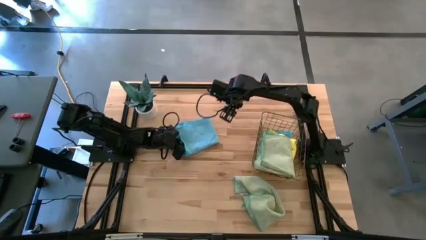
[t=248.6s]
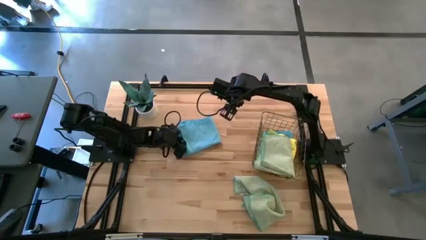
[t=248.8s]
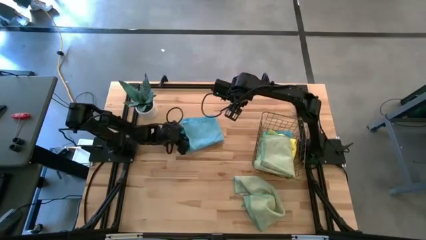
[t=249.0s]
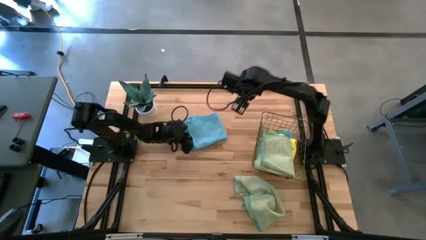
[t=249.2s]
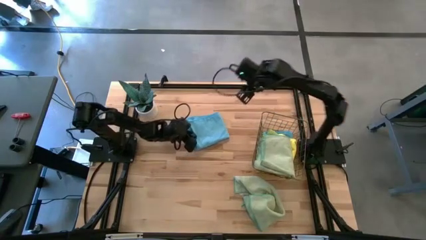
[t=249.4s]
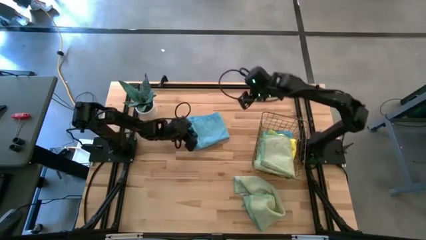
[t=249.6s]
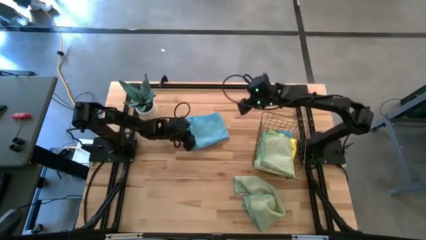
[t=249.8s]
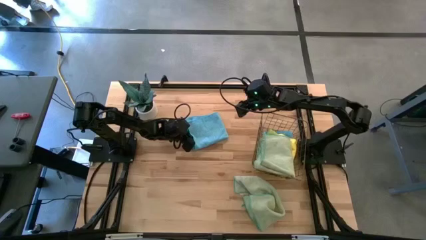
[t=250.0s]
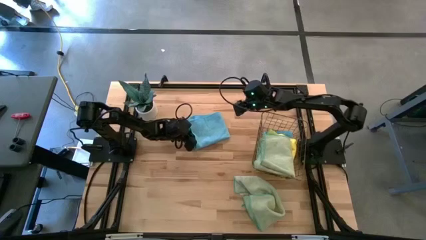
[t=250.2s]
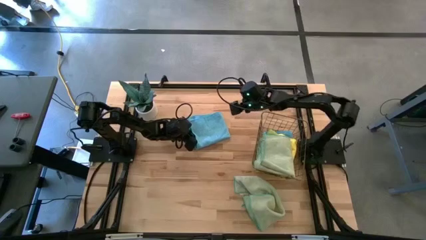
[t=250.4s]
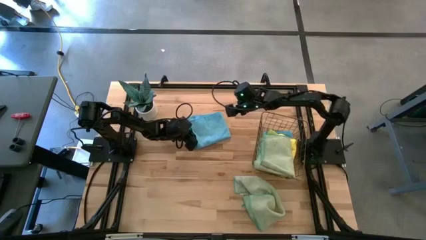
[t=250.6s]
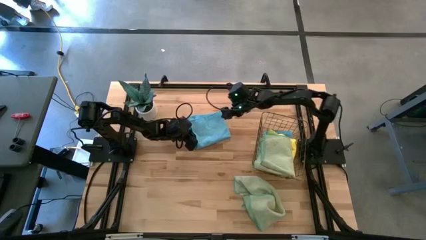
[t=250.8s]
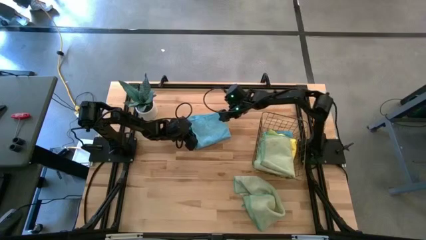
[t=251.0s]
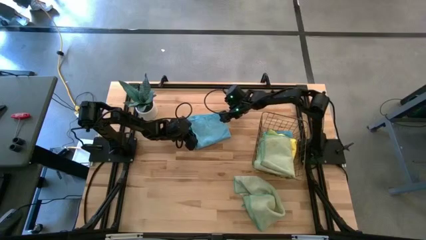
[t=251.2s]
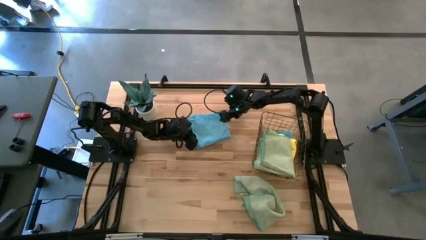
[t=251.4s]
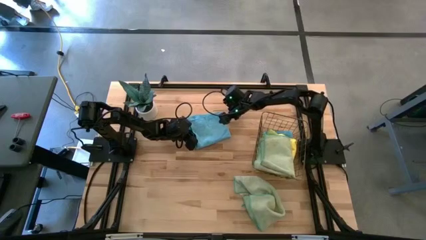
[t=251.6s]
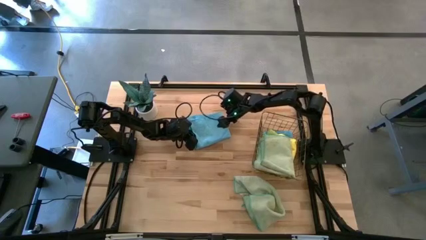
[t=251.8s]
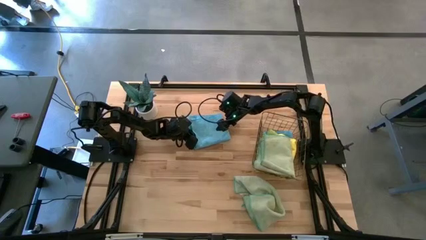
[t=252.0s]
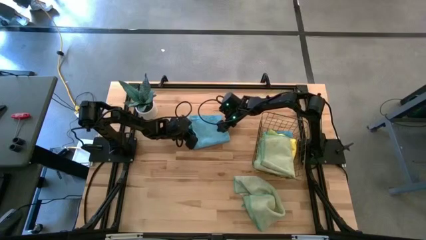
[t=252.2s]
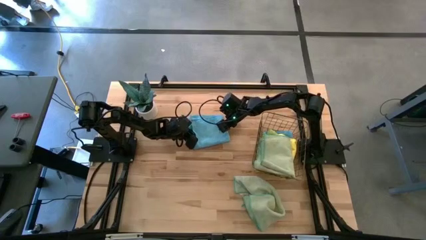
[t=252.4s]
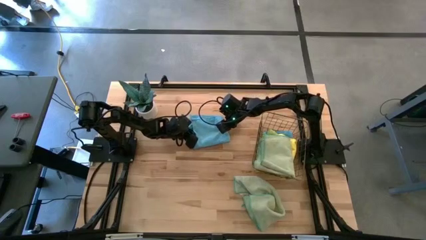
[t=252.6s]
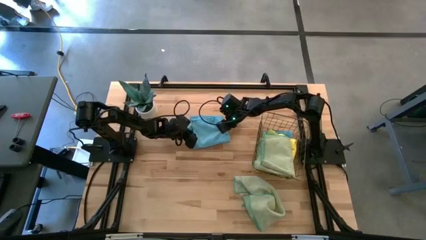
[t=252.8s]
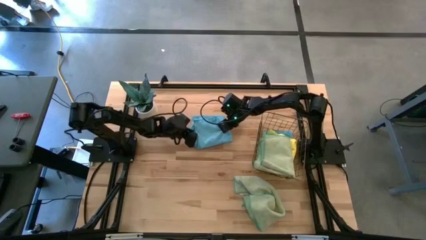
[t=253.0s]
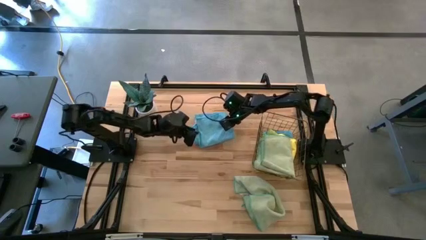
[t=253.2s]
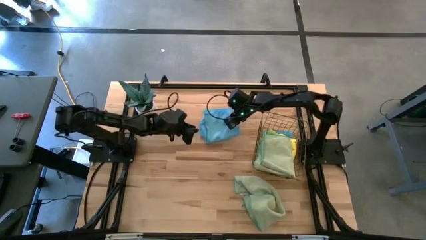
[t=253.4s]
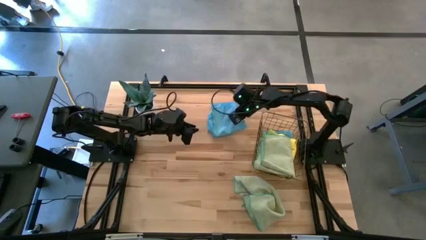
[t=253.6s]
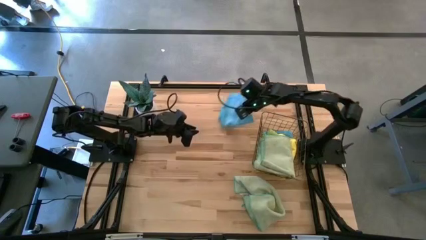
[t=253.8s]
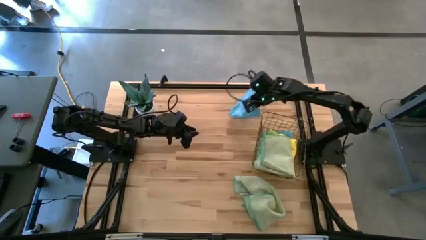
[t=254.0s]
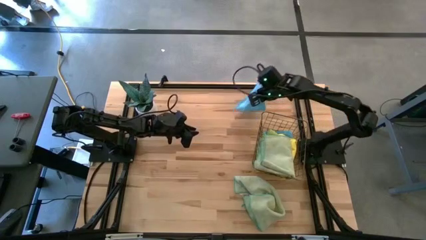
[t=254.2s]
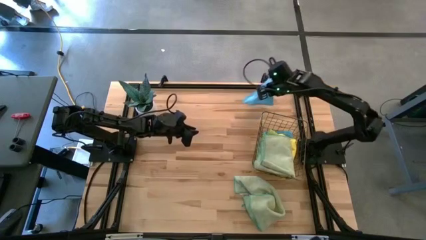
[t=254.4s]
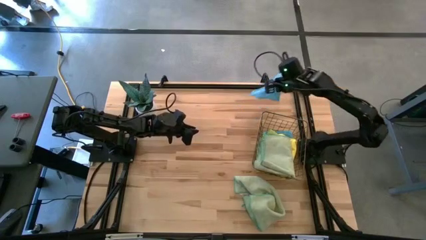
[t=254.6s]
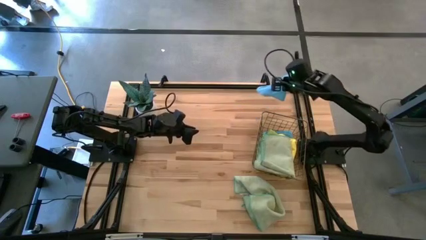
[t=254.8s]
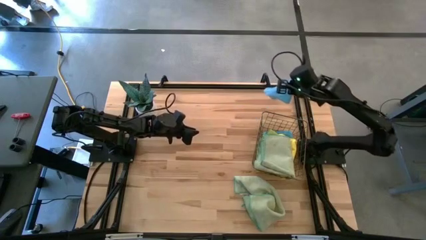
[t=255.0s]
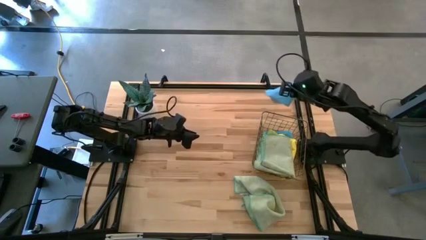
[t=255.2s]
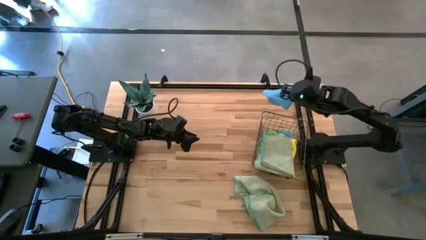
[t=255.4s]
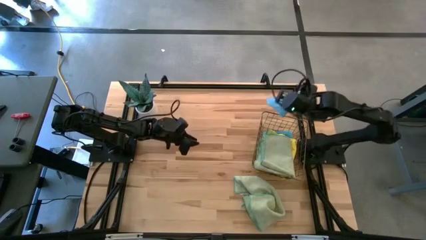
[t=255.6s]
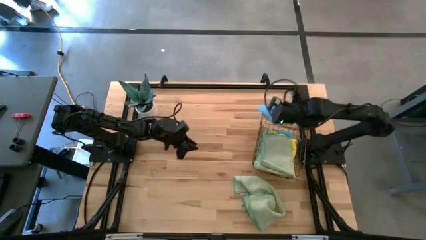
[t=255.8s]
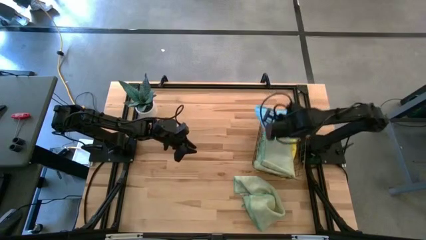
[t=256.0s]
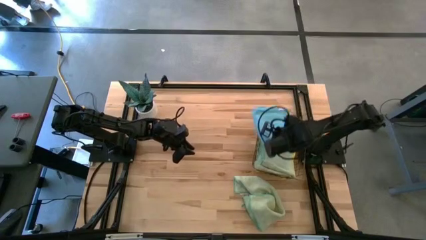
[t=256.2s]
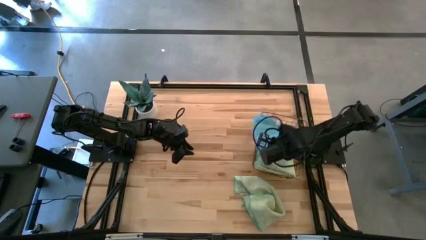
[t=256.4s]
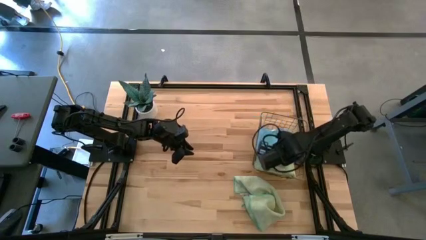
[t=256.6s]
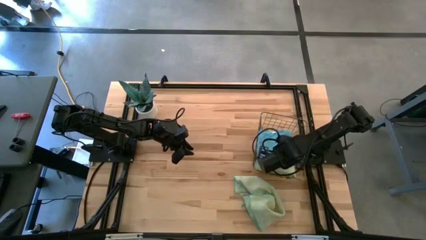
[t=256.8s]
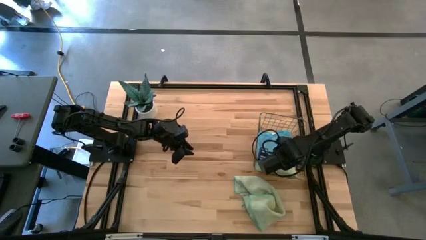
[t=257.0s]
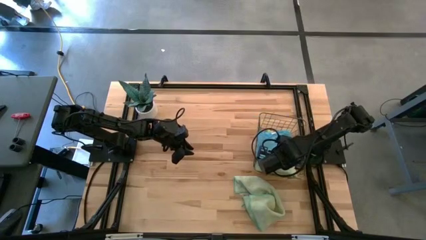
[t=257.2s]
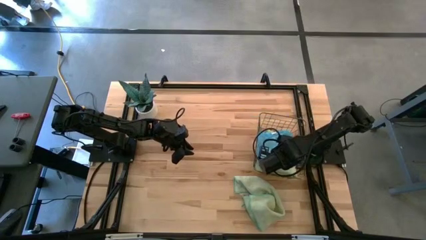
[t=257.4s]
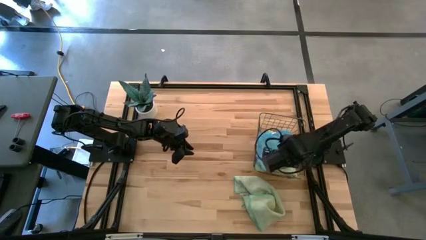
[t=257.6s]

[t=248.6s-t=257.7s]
Task: Fold microfiber towels
Stack the folded blue microfiber cloth into the wire basket

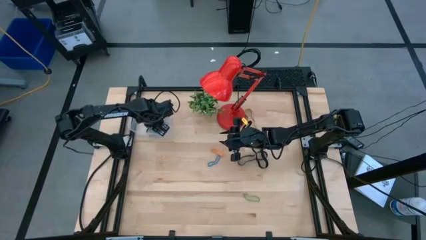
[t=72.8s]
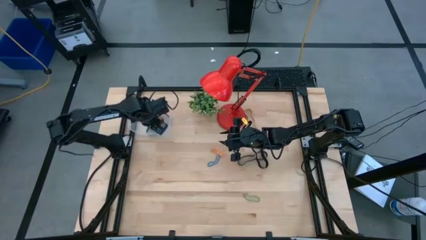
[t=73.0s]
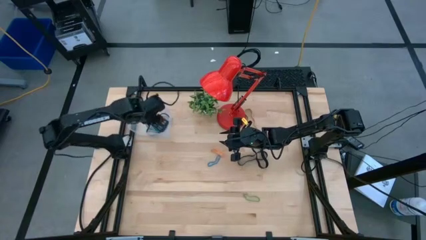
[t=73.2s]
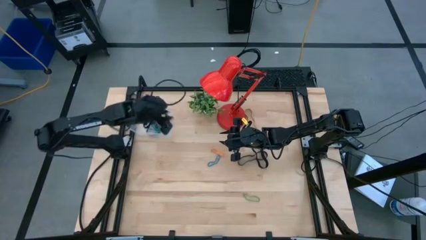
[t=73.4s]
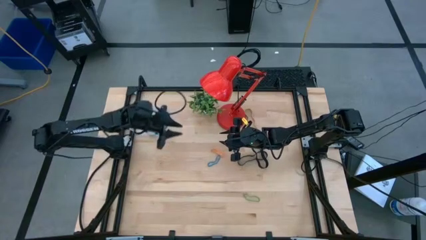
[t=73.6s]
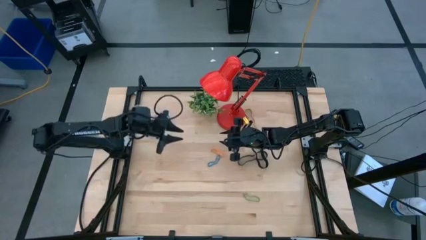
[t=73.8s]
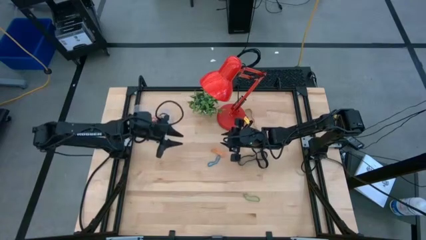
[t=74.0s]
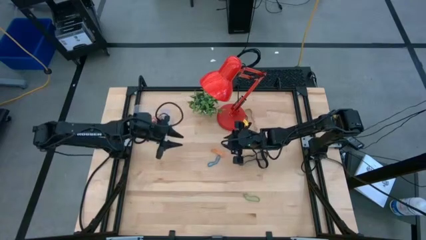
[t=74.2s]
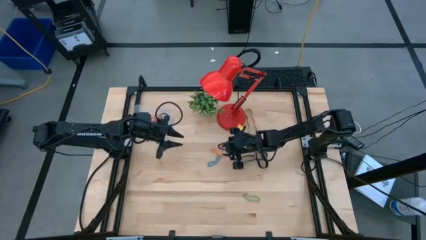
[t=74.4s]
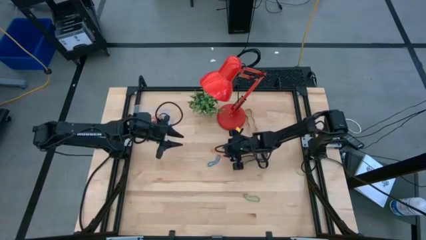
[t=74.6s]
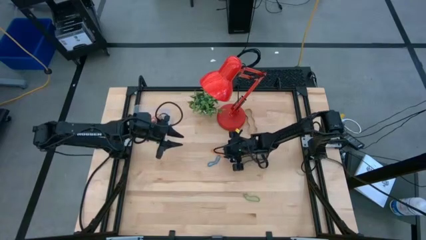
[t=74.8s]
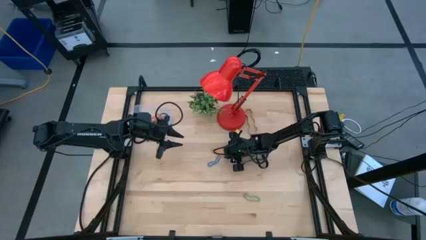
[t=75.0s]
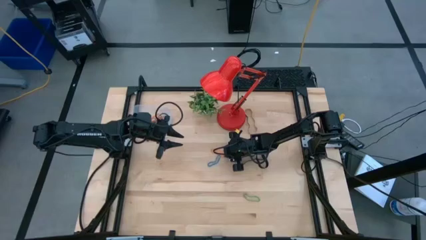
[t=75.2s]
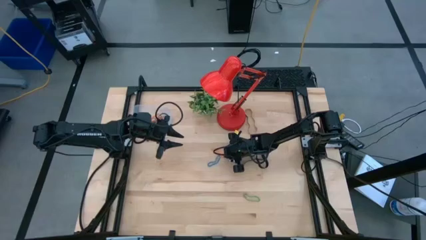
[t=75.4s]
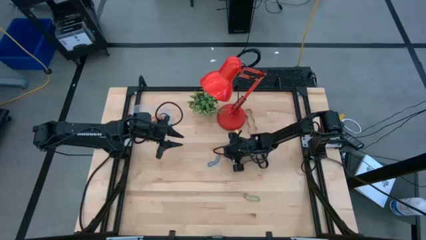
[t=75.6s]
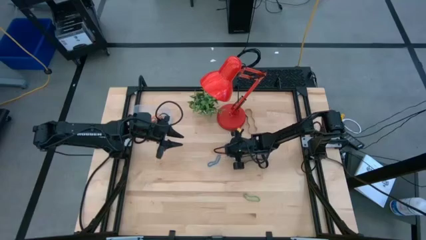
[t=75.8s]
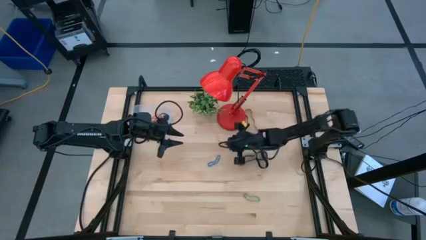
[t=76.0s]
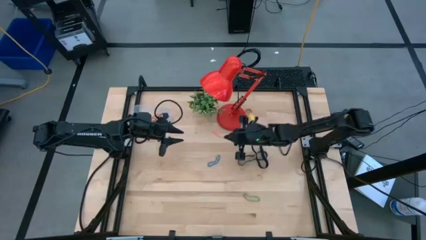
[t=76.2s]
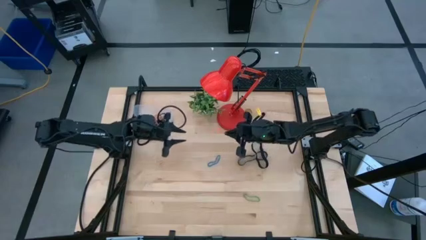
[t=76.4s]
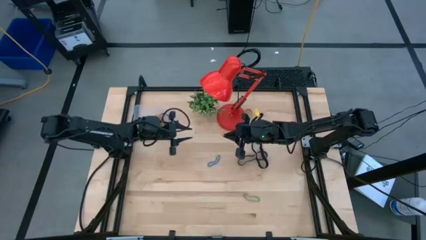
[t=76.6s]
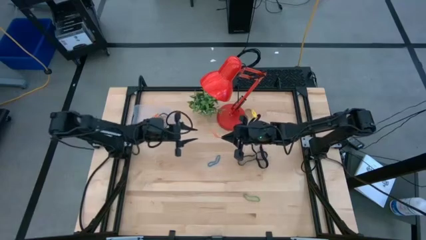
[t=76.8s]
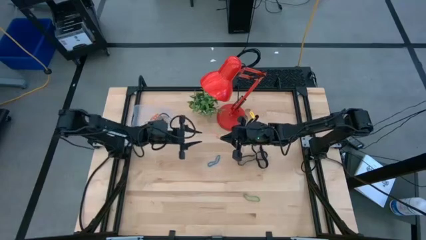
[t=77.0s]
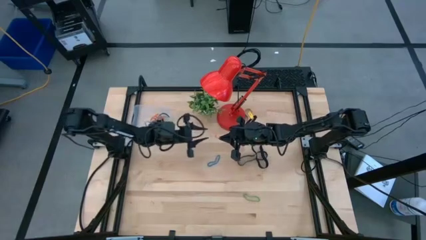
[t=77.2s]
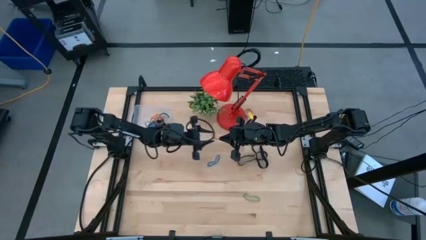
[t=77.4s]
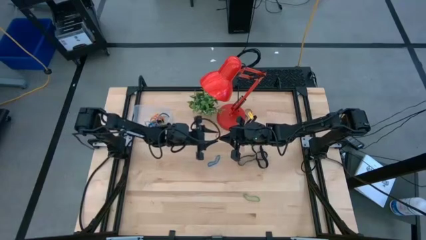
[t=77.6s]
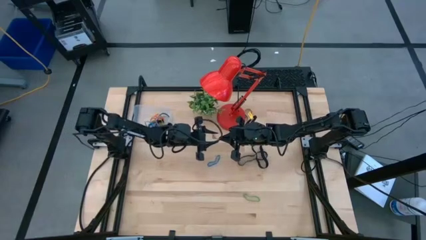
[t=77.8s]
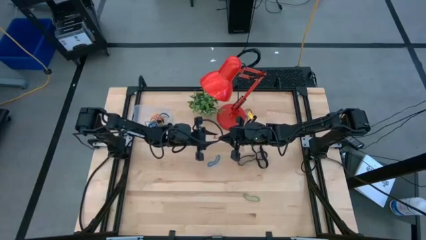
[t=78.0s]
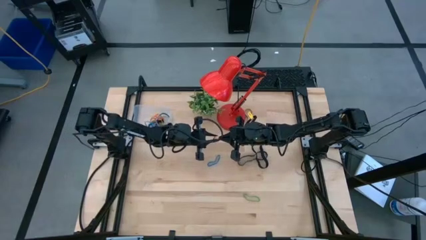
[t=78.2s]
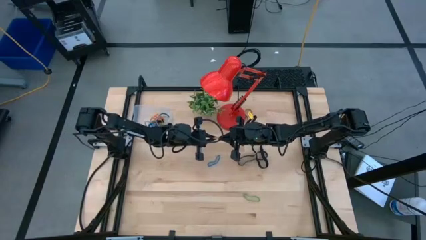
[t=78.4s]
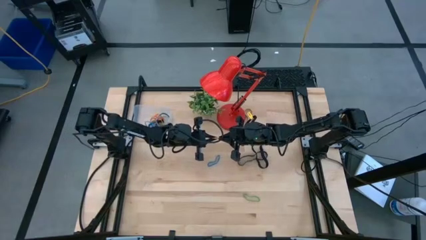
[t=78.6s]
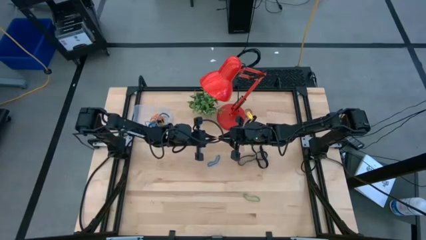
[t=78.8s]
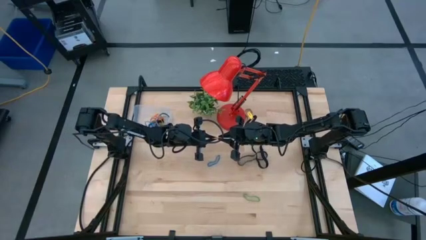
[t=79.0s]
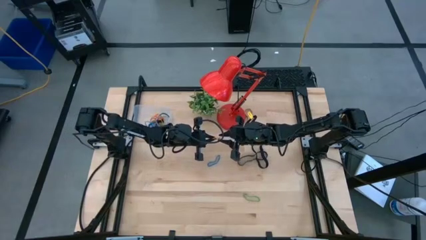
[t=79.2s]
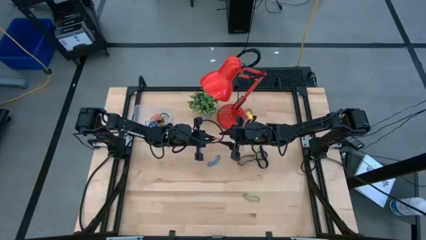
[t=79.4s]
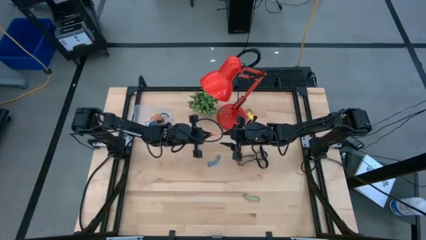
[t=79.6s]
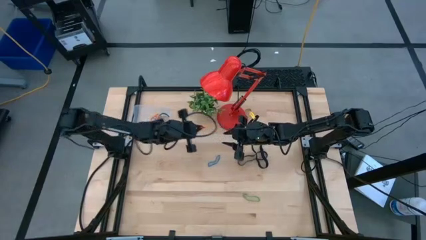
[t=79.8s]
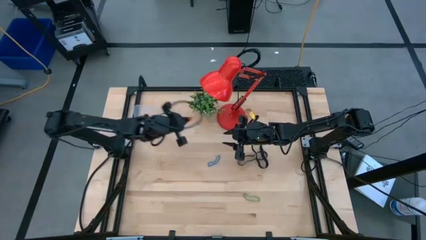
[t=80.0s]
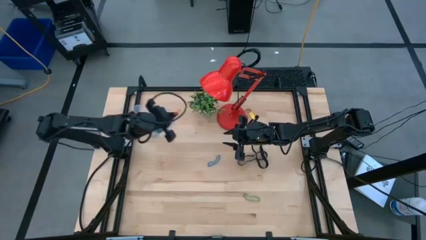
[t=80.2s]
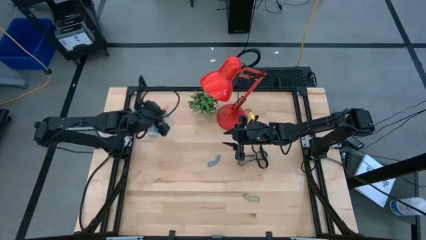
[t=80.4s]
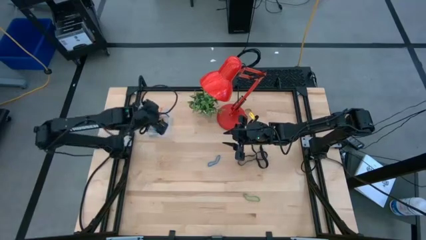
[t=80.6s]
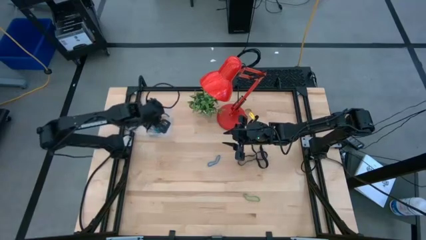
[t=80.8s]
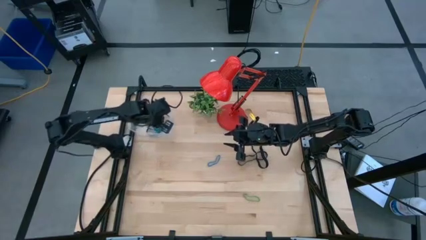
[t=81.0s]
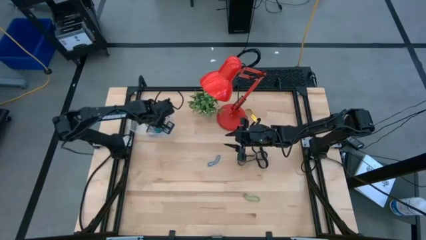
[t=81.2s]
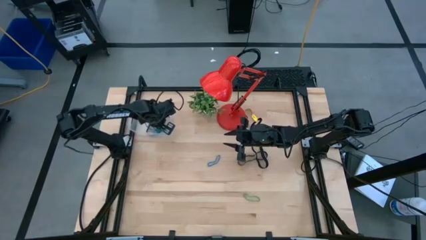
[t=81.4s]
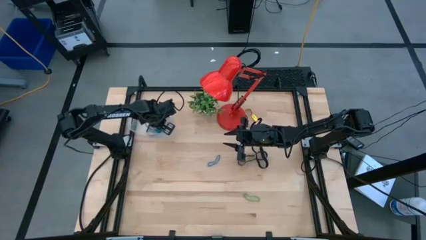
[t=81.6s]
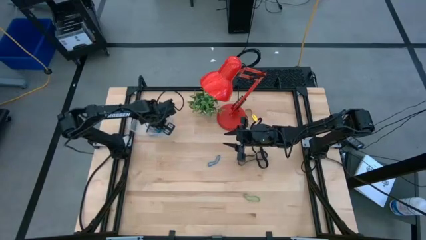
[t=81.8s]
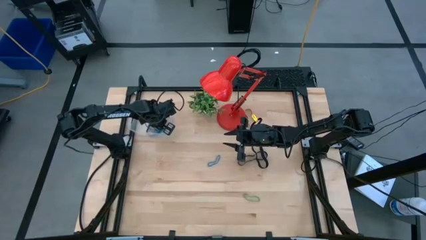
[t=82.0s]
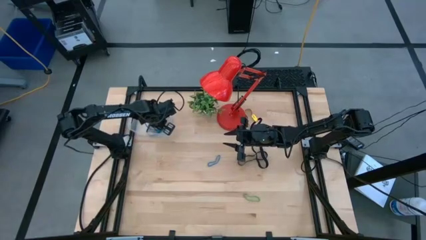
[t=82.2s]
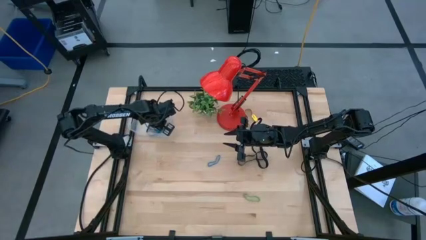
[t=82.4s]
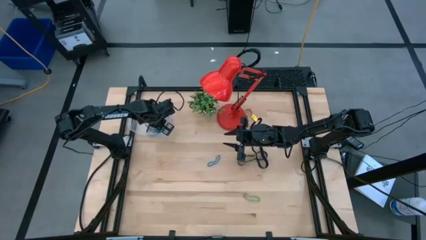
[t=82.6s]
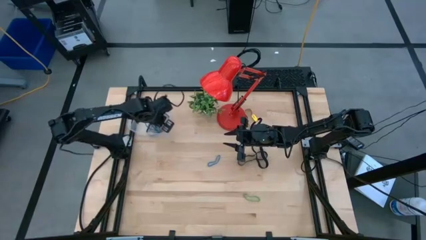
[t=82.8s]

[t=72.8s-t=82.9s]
Task: Pick and place rubber bands into bin
Put the orange rubber band into the transparent bin
